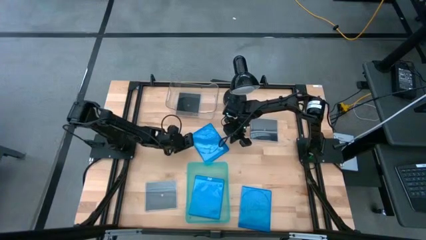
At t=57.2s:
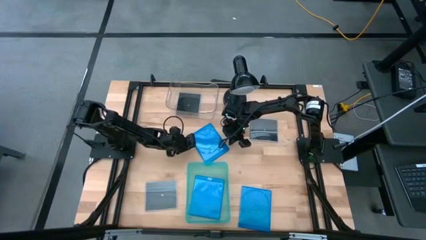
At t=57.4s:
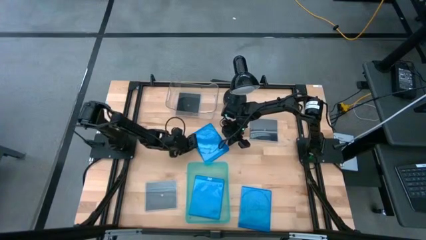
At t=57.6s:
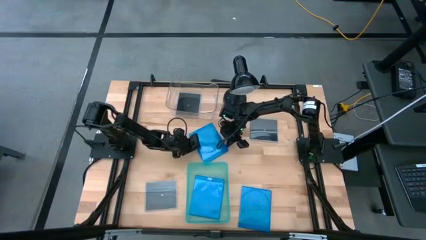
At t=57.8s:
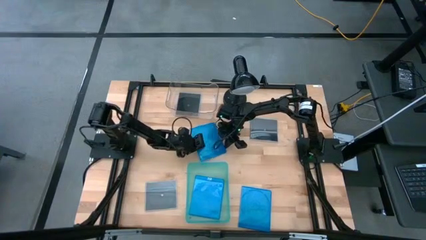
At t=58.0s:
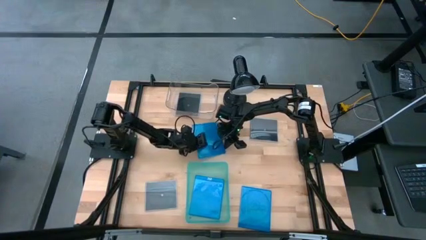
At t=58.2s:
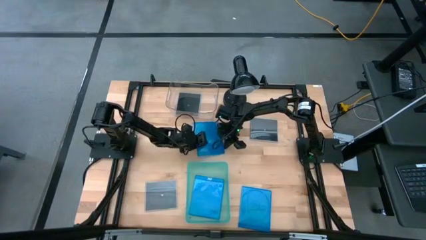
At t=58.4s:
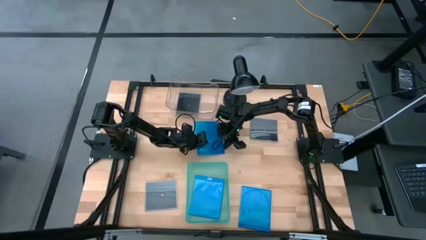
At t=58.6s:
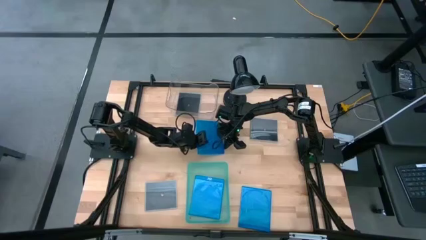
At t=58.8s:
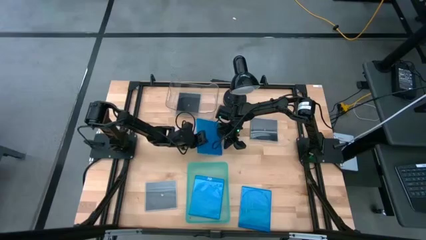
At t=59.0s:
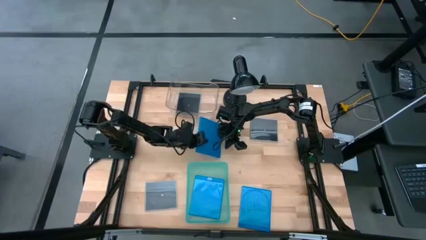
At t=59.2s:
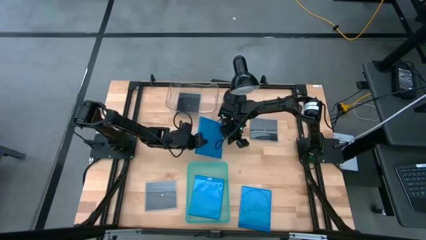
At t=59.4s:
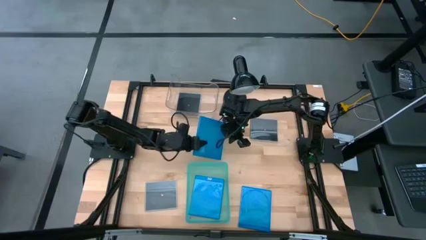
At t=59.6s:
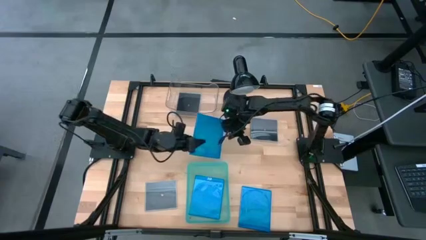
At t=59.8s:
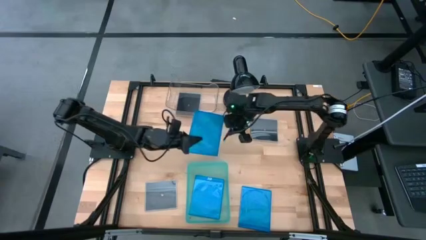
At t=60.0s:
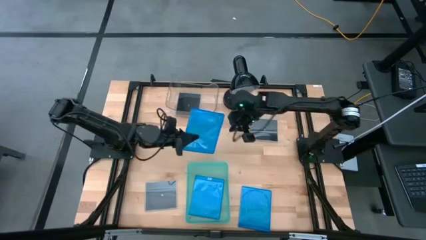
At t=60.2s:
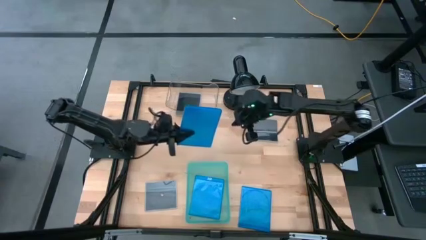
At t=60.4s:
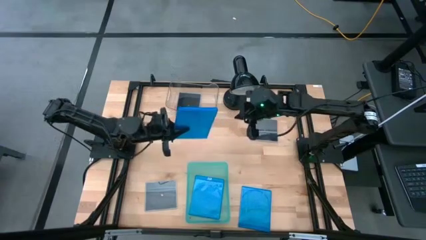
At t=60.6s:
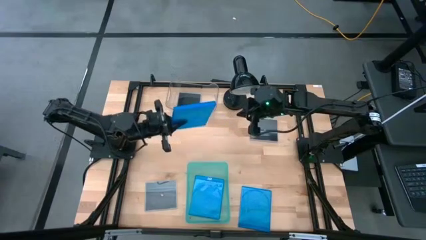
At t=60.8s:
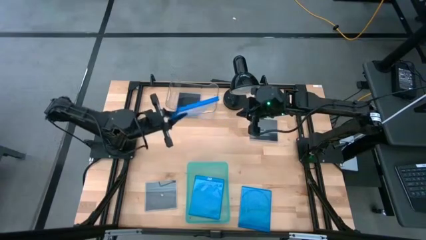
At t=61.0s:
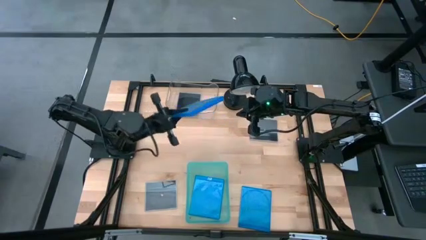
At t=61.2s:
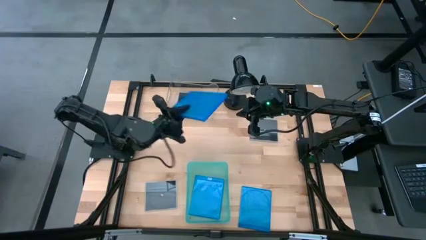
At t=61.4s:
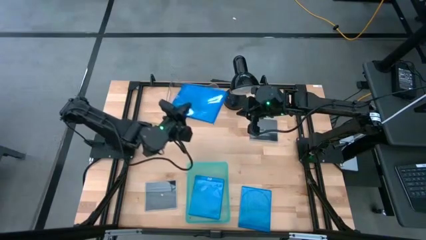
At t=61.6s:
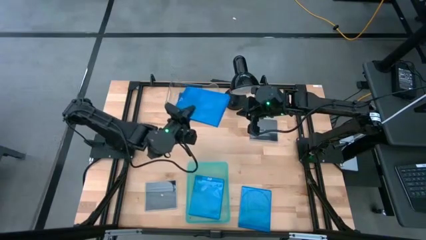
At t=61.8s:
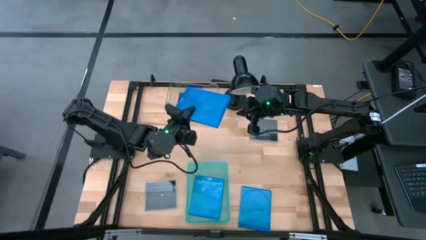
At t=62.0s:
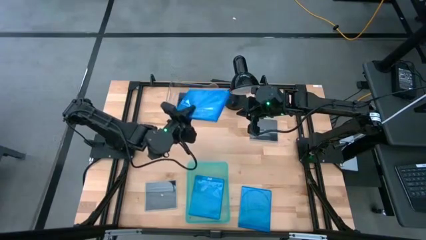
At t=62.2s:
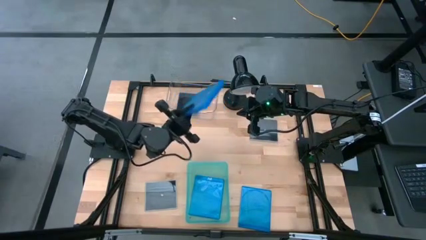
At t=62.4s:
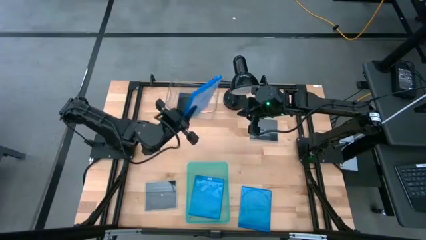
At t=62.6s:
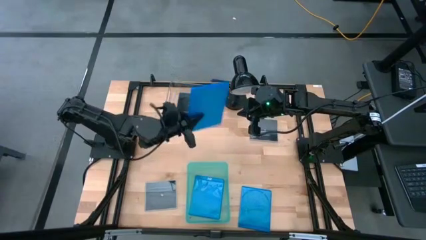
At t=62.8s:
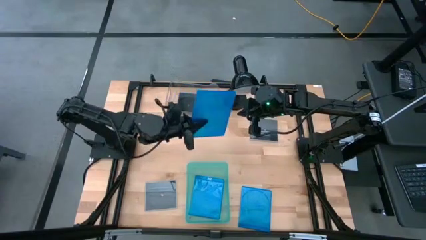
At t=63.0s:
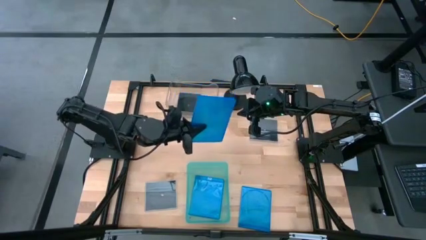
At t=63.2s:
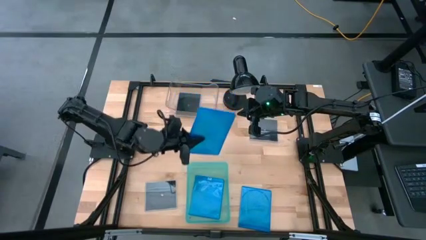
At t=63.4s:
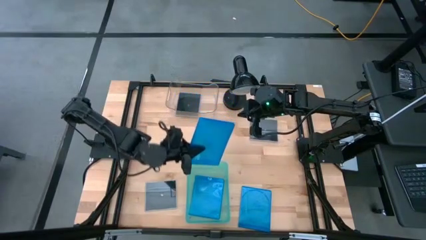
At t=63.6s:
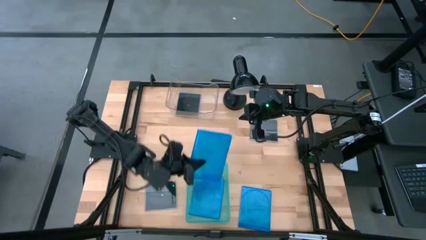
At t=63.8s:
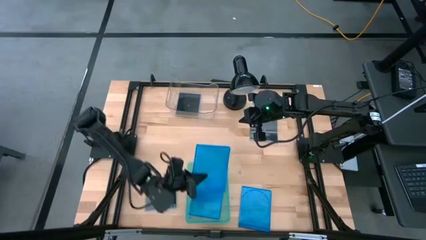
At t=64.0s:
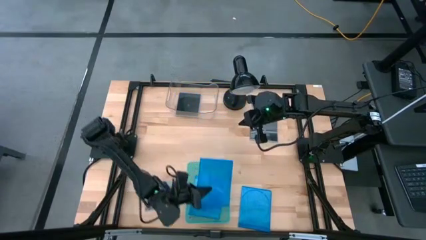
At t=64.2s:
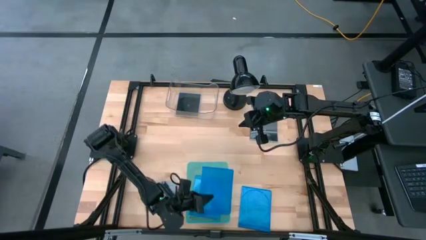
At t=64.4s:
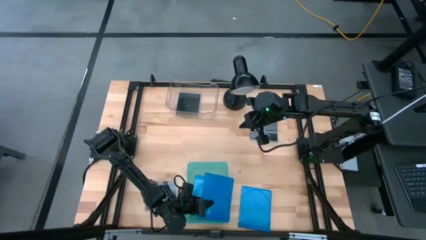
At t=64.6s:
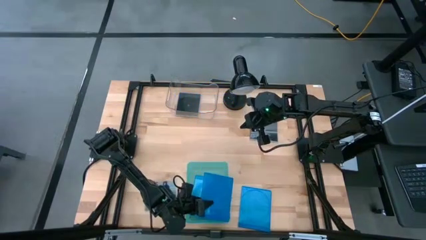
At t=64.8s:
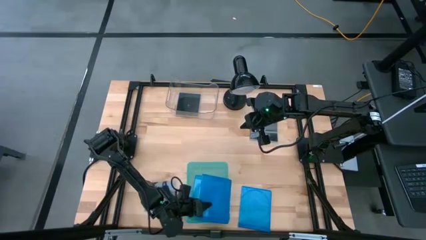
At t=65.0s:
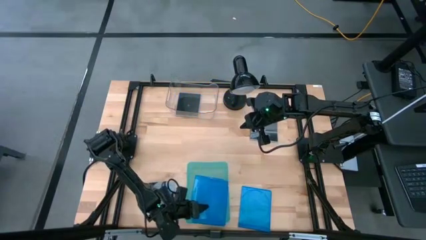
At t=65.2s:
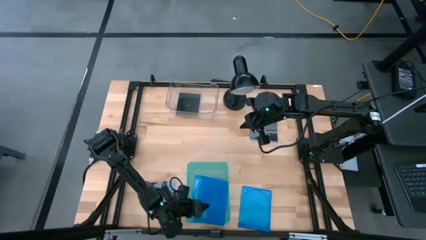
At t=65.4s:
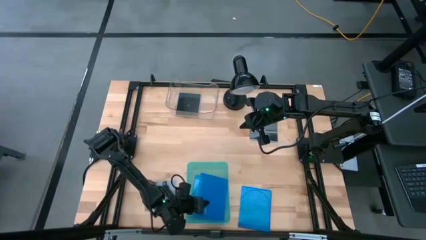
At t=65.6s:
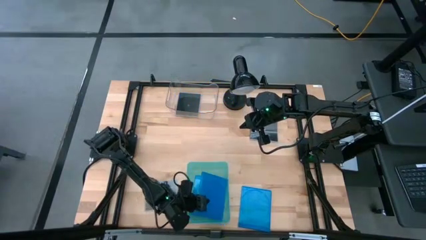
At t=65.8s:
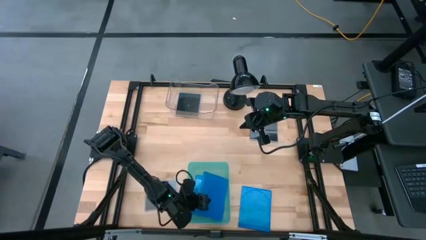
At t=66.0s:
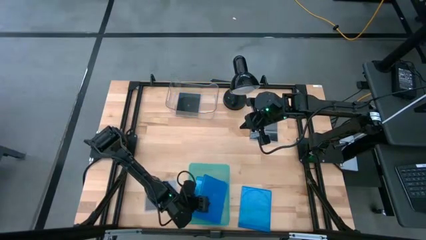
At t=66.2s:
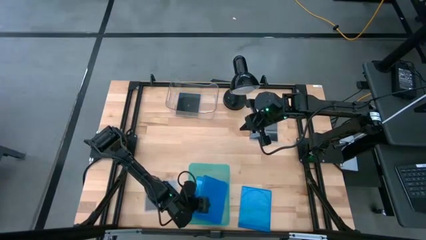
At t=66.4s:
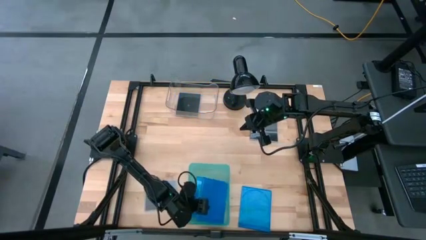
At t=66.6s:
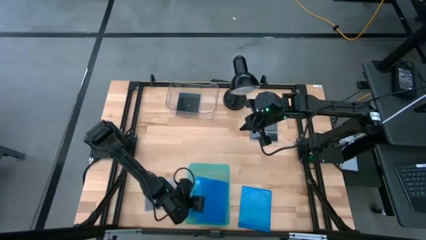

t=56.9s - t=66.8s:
Task: Pick & place jewel cases by type
Put the top blue CD case into the green bin

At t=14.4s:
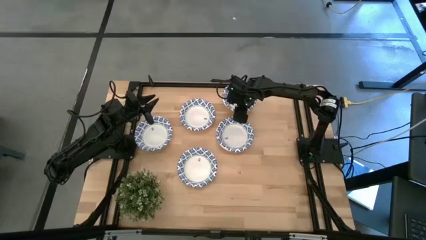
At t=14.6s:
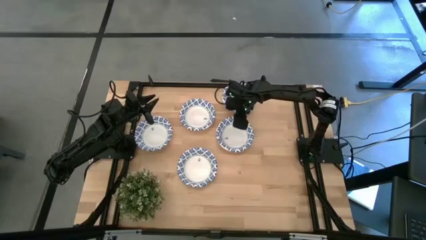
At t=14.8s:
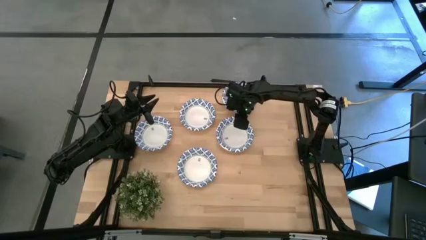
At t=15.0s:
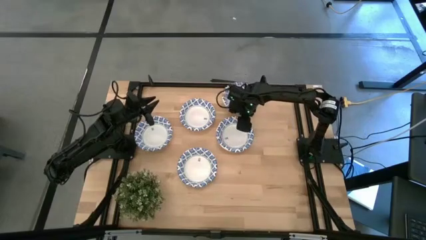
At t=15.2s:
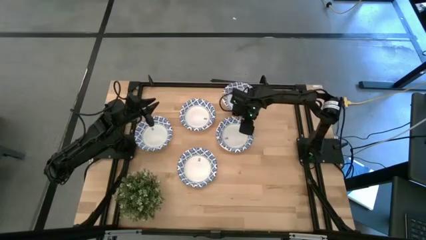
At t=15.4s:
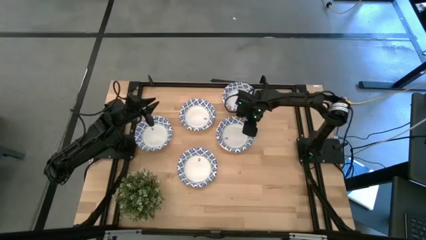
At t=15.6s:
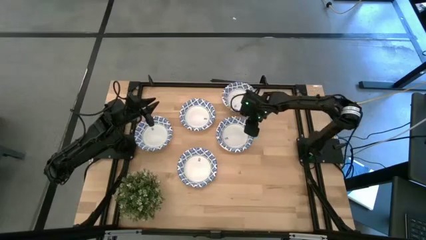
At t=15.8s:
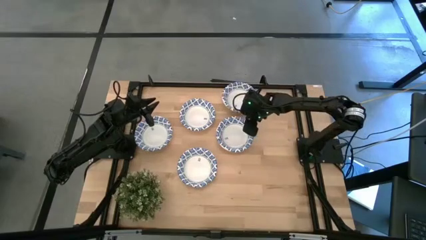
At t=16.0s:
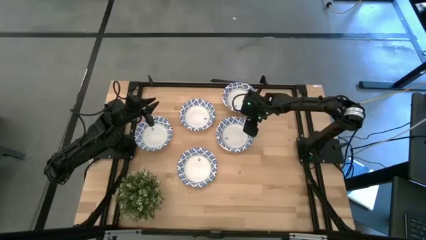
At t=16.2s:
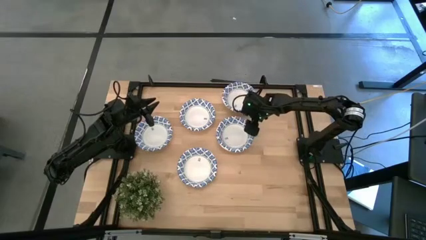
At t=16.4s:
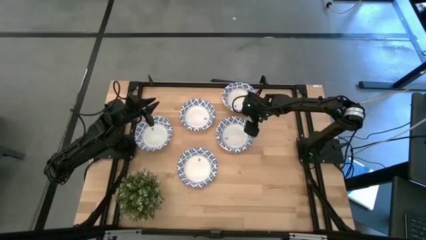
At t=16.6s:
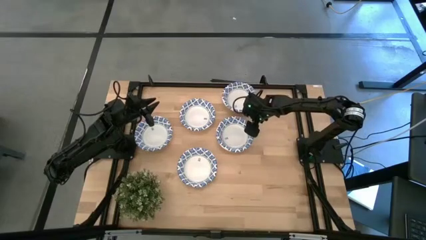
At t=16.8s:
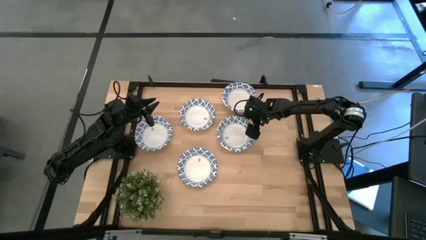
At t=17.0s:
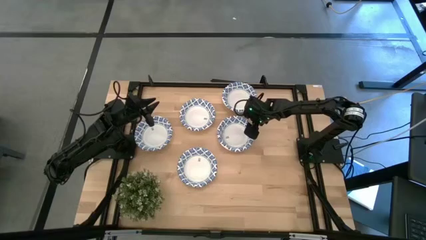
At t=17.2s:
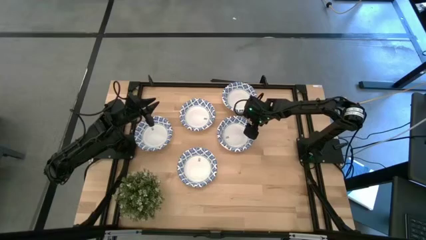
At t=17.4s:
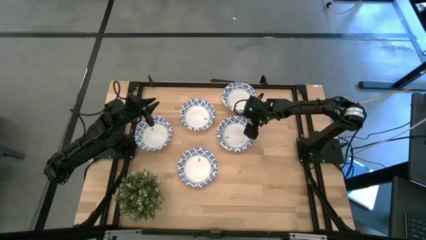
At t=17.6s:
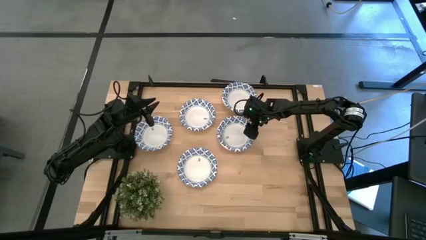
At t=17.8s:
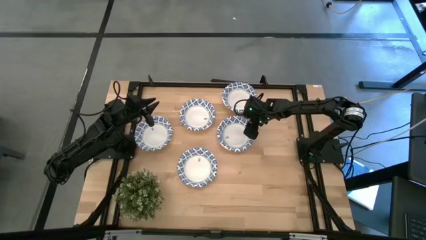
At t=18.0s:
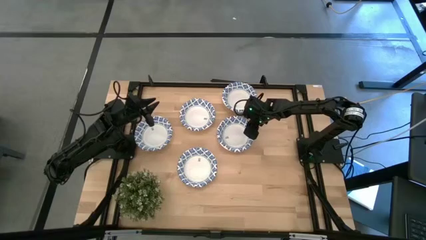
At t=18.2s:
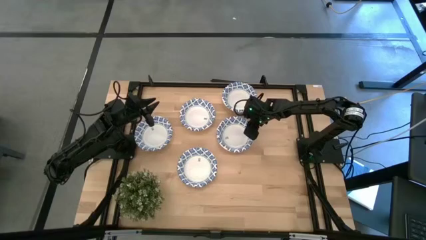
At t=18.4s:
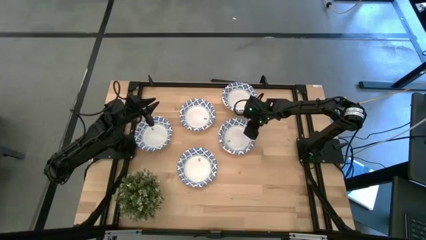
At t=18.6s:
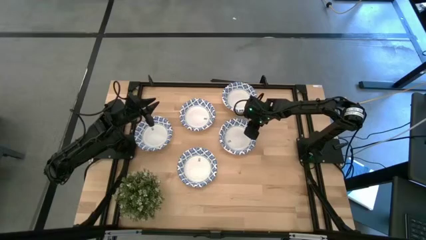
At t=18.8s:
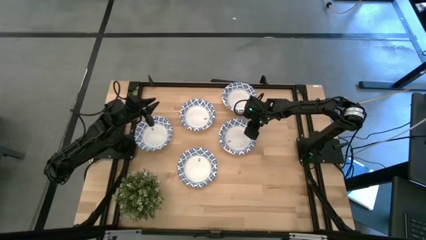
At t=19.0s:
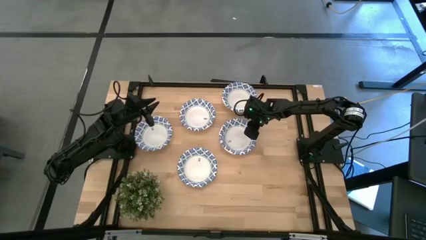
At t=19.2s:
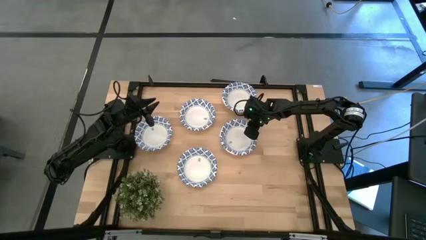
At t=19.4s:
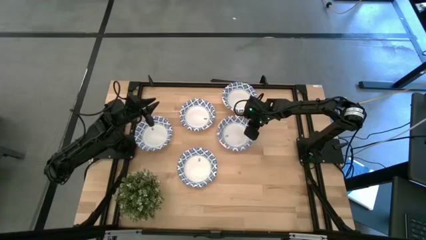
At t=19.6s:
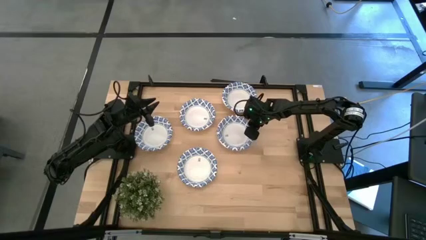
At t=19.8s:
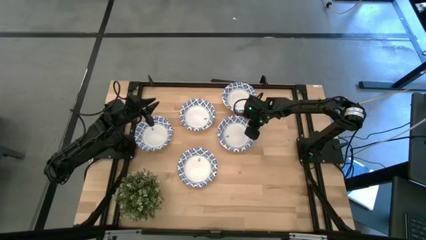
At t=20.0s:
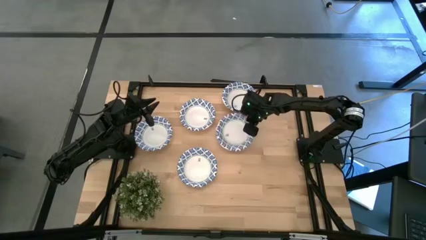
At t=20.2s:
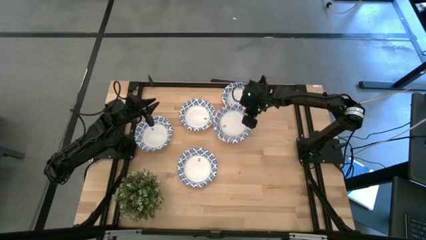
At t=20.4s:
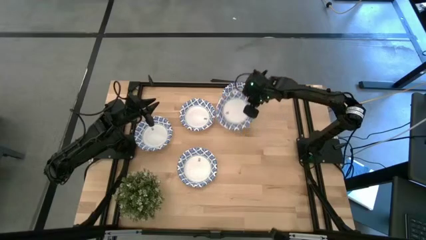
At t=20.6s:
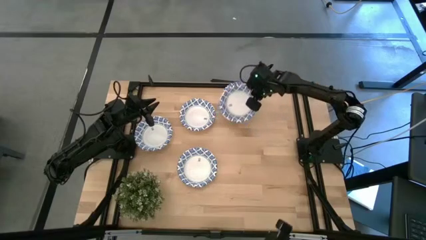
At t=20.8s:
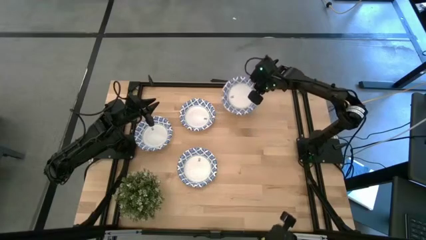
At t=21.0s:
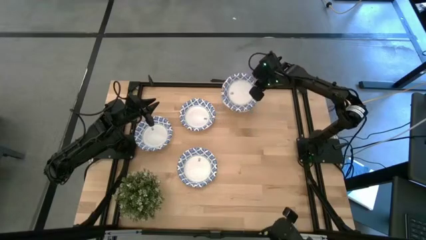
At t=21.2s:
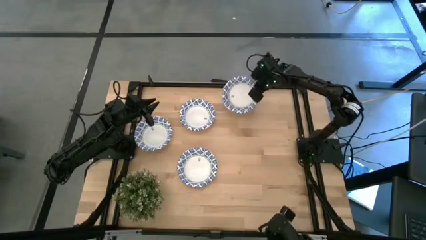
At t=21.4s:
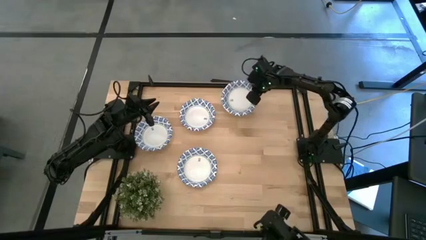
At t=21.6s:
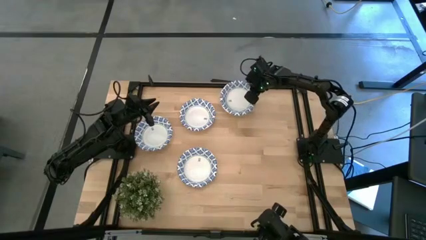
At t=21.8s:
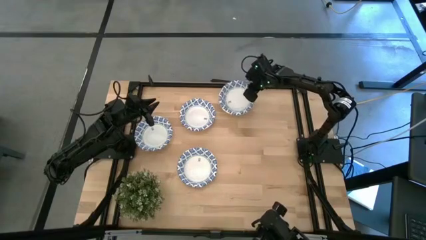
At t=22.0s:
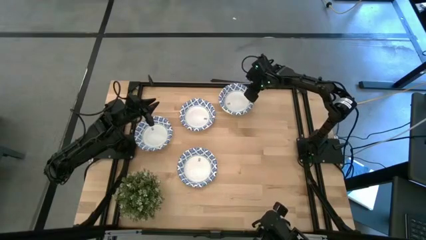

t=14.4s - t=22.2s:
Task: Nest bowls inside each other
Stack the bottom right bowl on the top right bowl
